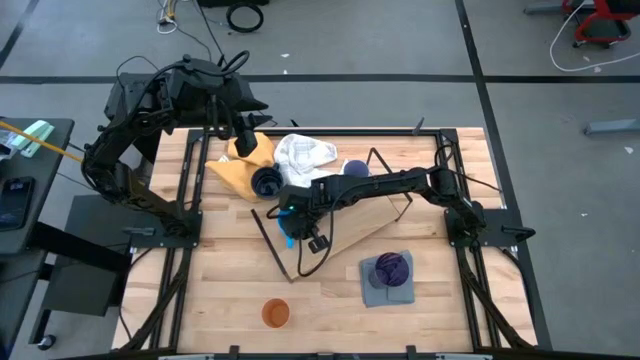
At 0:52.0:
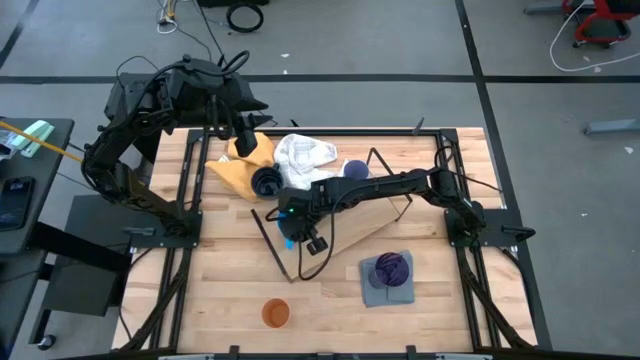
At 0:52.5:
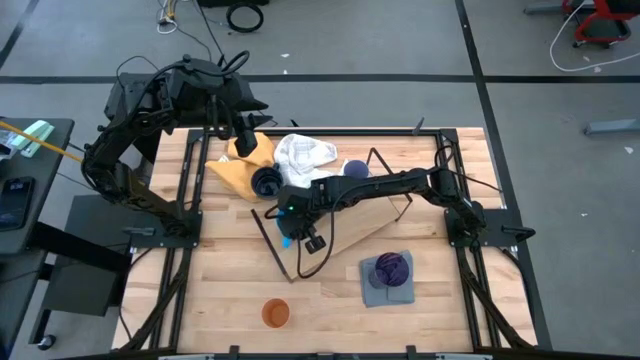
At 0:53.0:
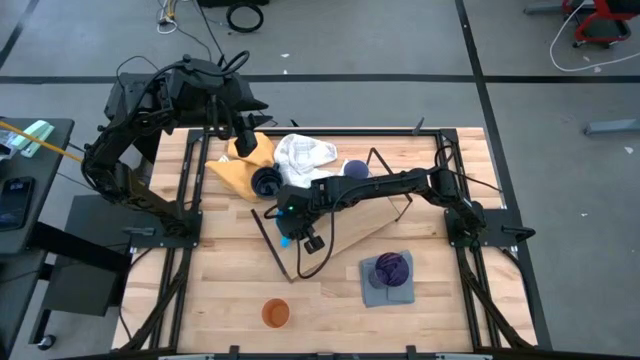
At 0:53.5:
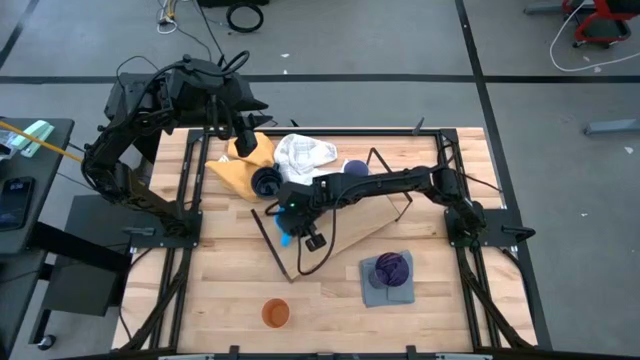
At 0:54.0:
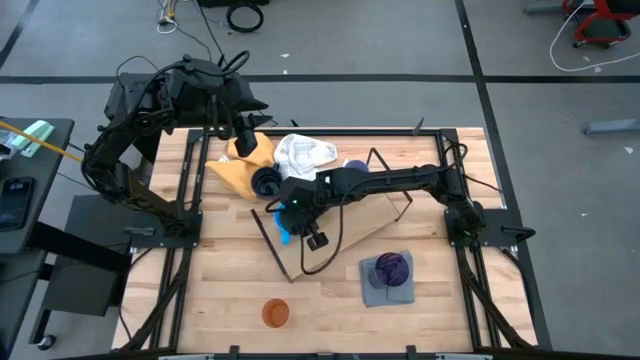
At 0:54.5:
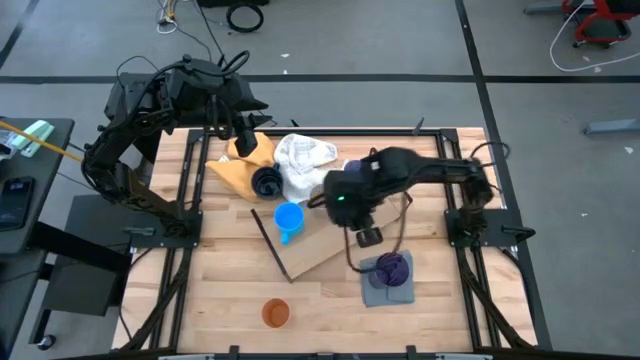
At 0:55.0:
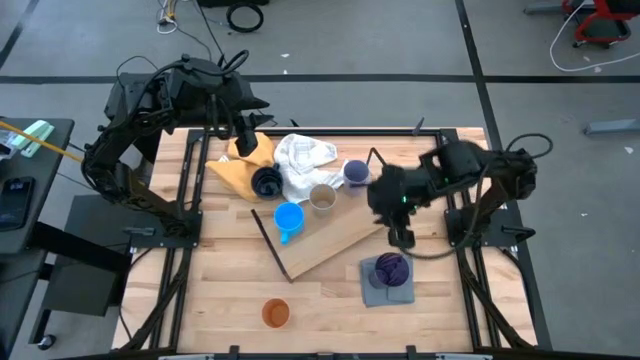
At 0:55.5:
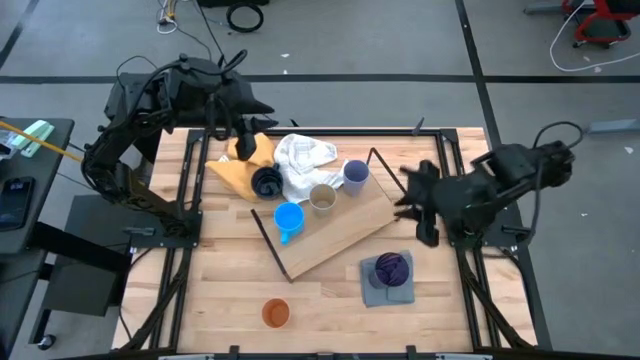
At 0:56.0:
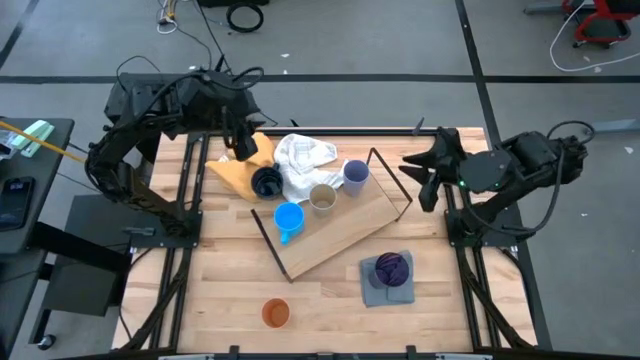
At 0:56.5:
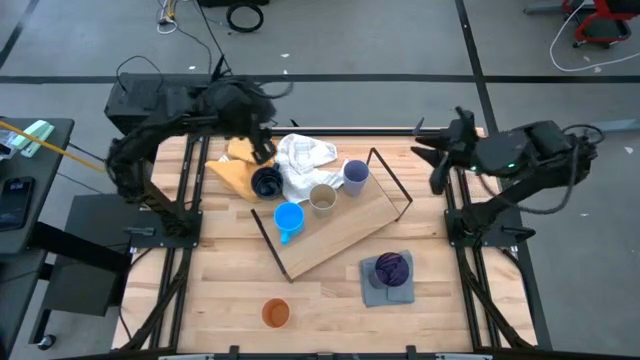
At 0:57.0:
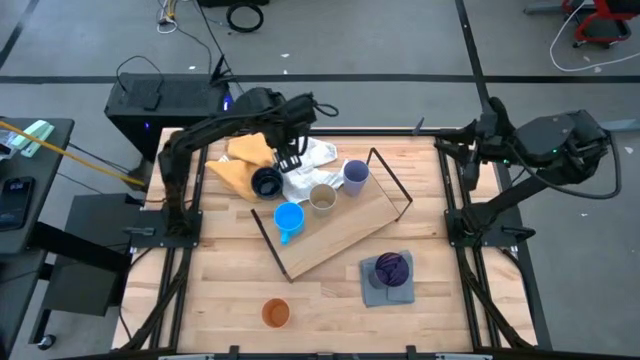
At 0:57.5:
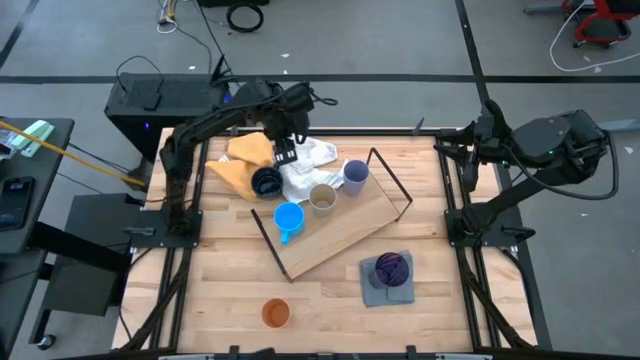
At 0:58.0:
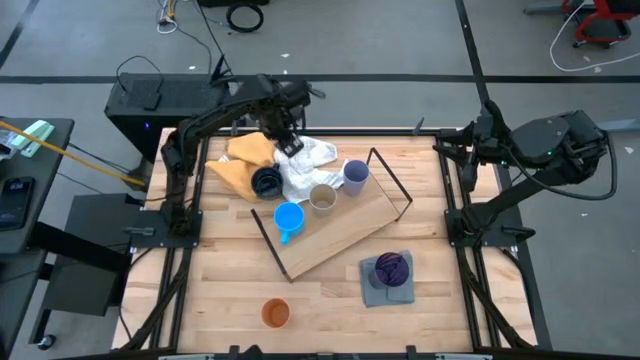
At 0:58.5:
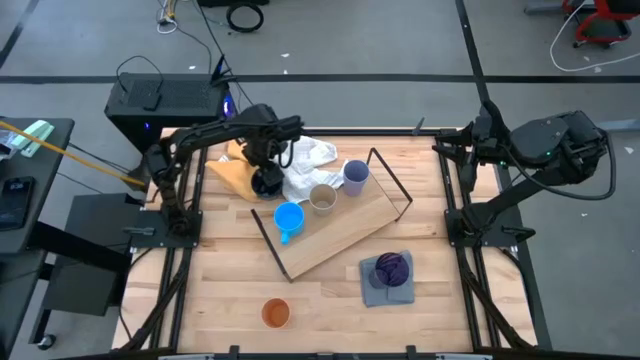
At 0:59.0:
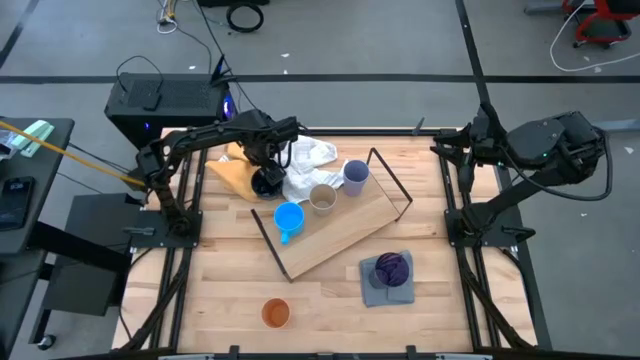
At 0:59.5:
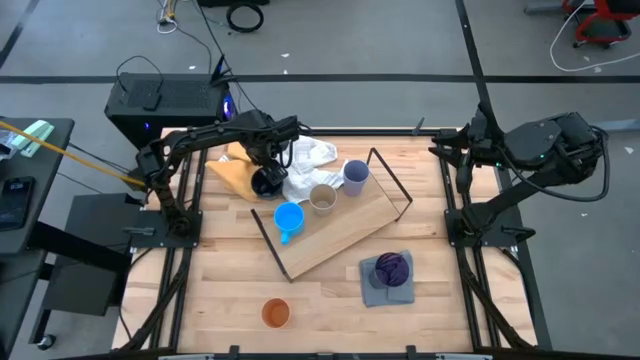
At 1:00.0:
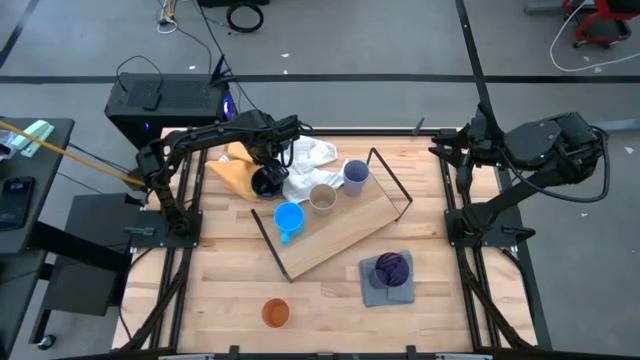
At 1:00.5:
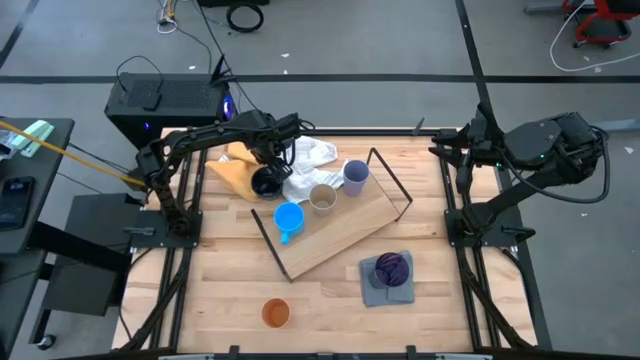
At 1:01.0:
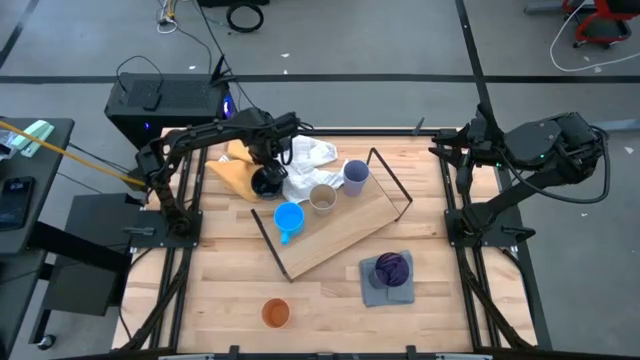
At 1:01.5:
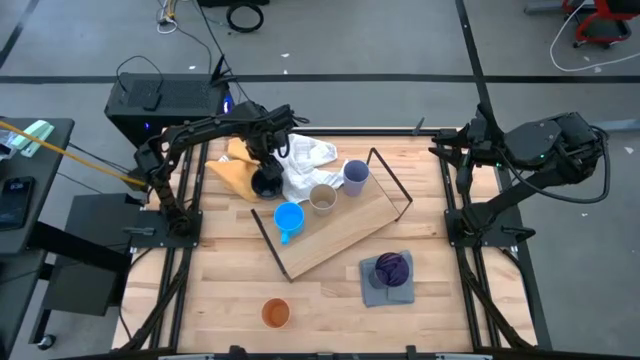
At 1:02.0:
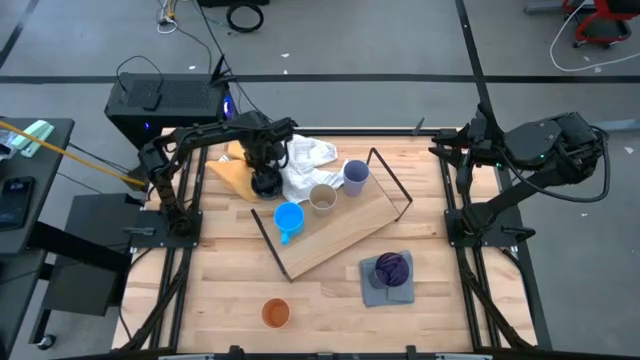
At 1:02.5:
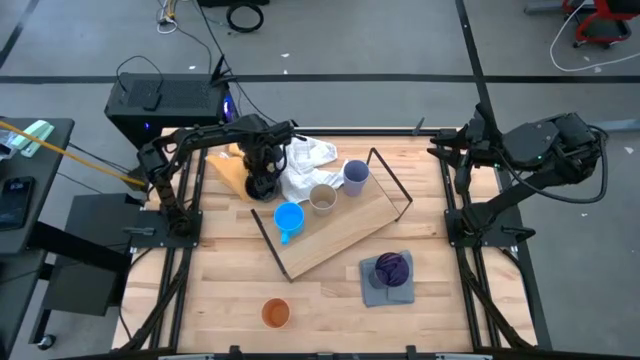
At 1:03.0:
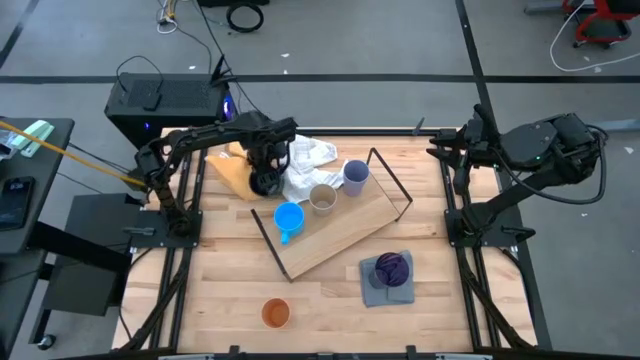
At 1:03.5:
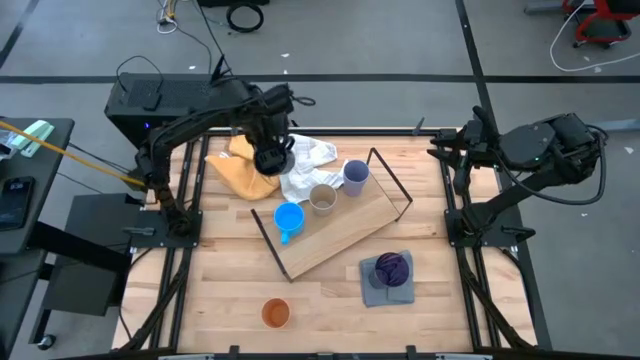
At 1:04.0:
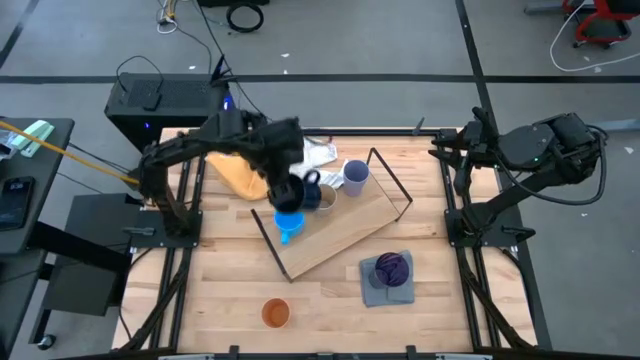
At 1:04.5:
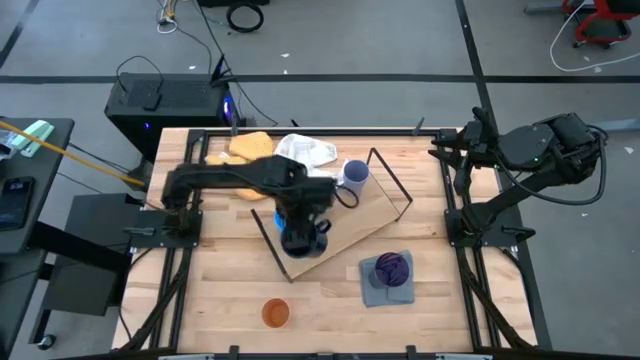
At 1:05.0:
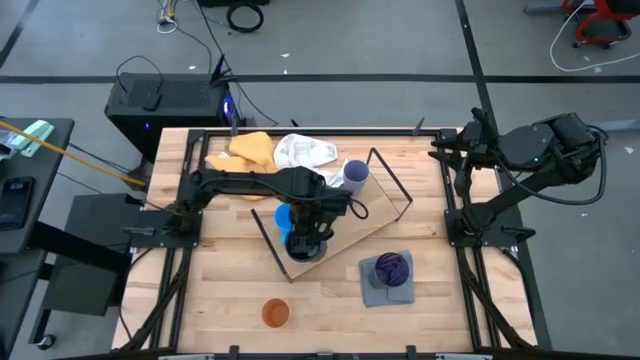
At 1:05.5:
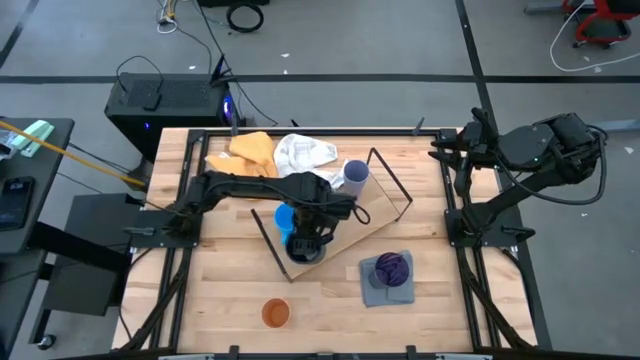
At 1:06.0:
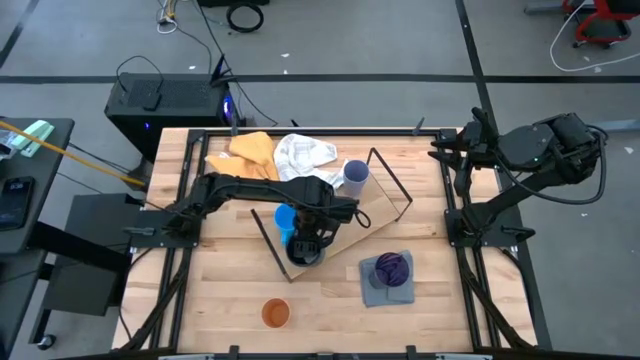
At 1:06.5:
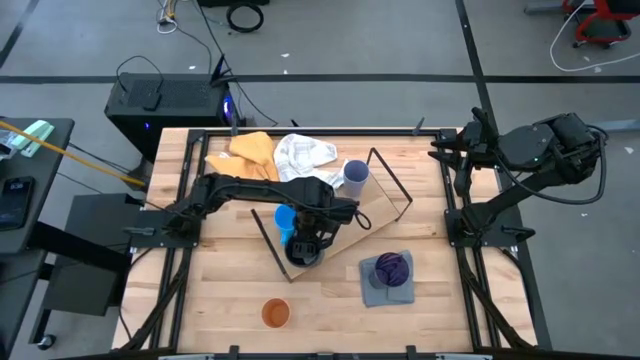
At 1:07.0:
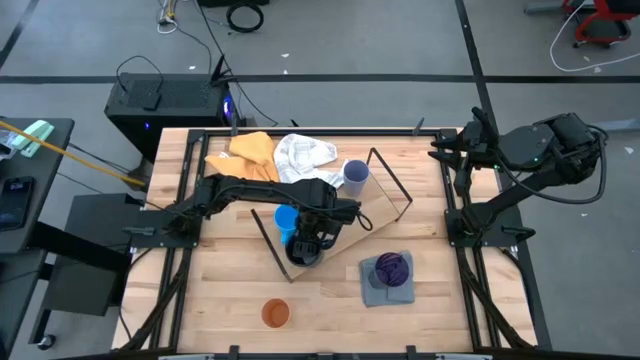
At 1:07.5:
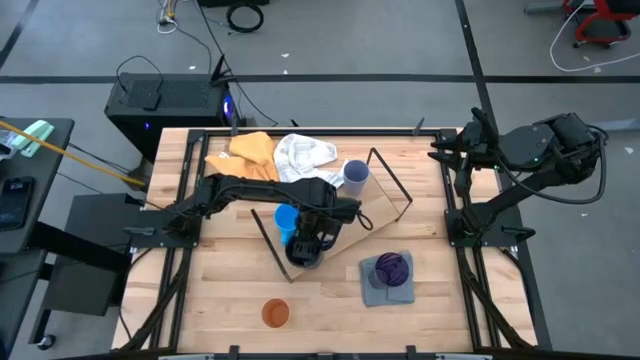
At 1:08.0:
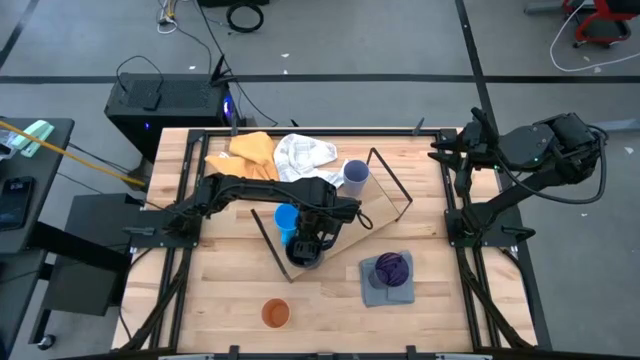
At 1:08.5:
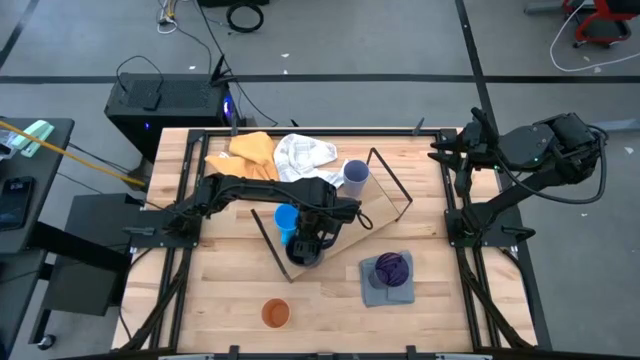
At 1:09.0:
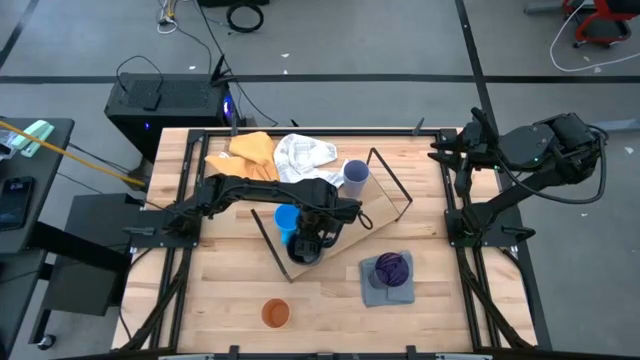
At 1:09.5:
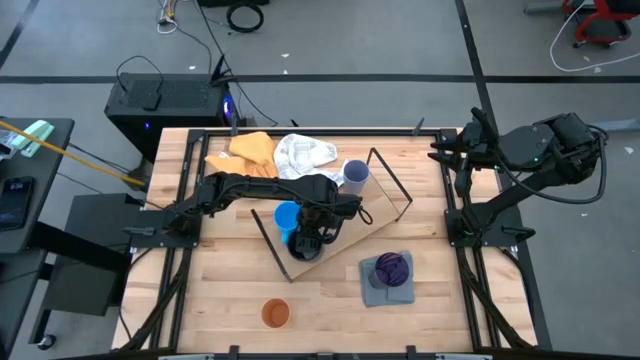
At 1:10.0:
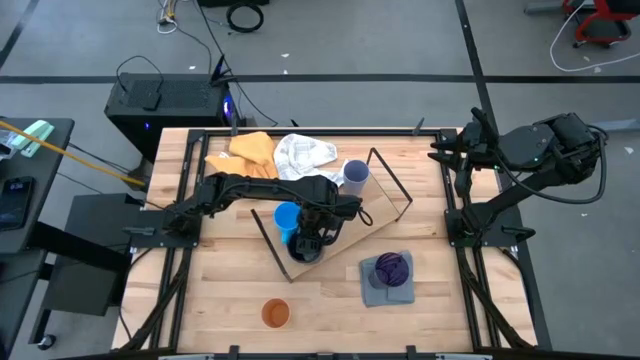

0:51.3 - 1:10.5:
Task: Stack small to large cups/mugs on shelf
Align the dark blue mug with the light blue mug on the shelf
